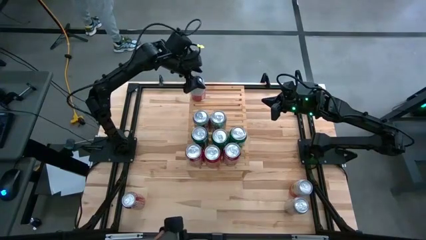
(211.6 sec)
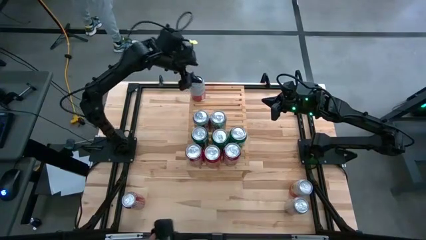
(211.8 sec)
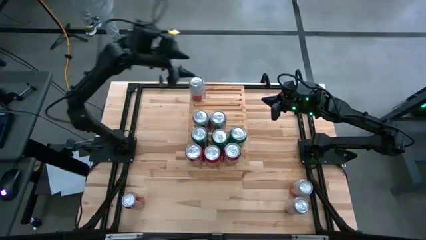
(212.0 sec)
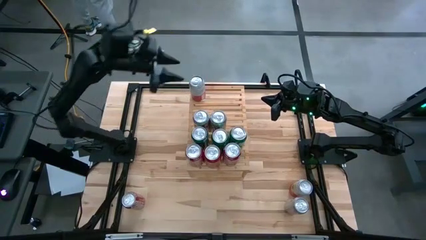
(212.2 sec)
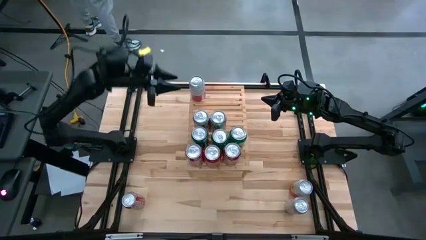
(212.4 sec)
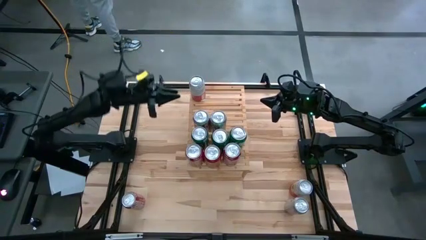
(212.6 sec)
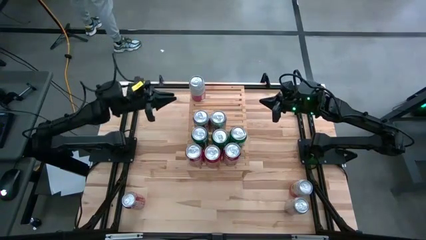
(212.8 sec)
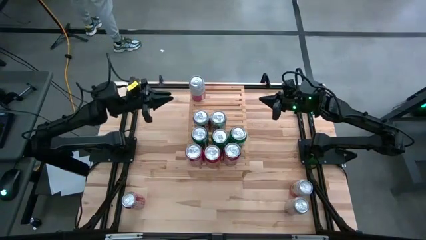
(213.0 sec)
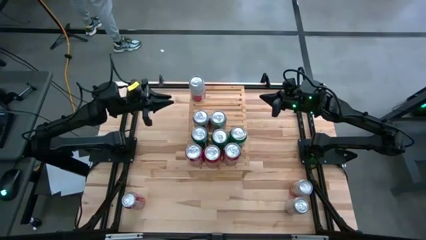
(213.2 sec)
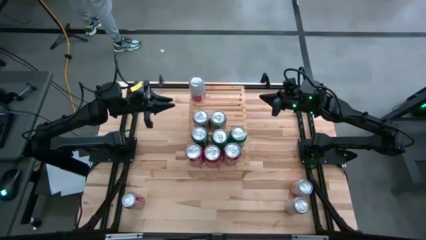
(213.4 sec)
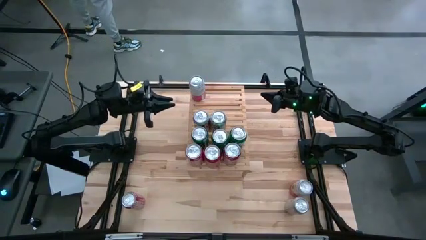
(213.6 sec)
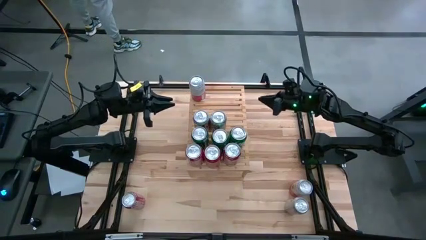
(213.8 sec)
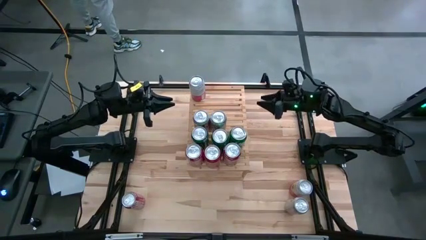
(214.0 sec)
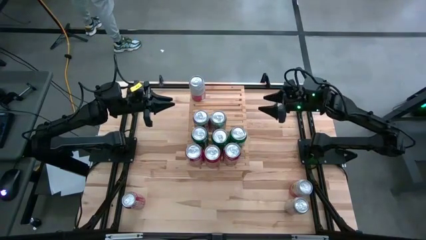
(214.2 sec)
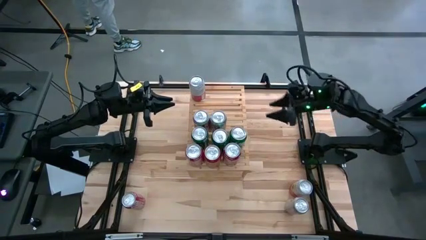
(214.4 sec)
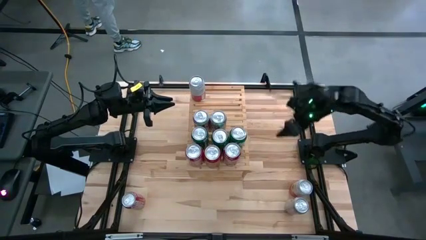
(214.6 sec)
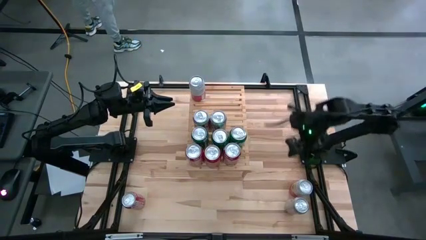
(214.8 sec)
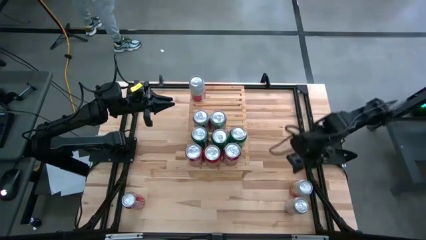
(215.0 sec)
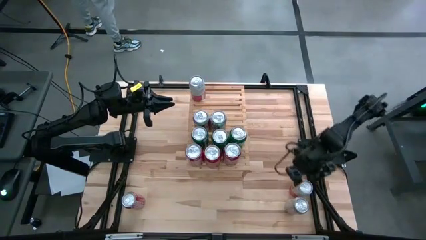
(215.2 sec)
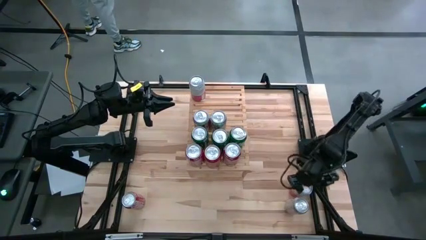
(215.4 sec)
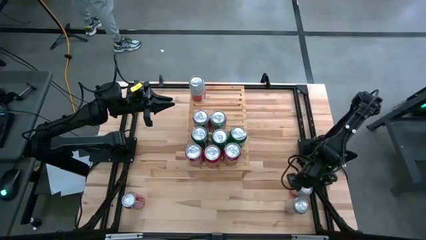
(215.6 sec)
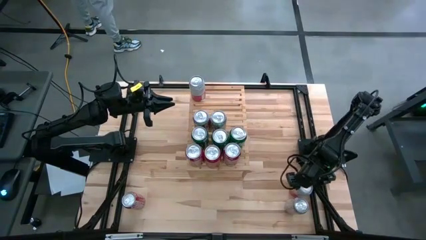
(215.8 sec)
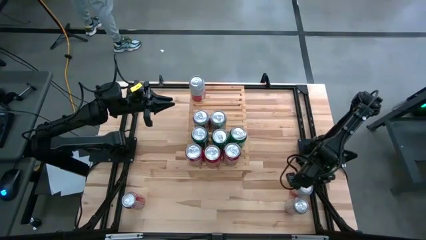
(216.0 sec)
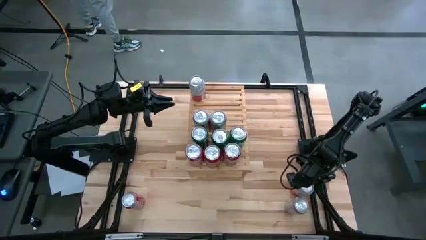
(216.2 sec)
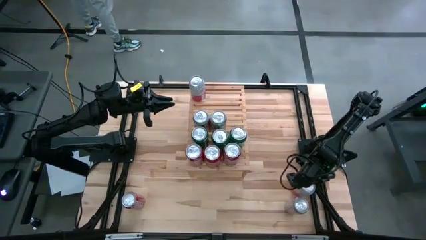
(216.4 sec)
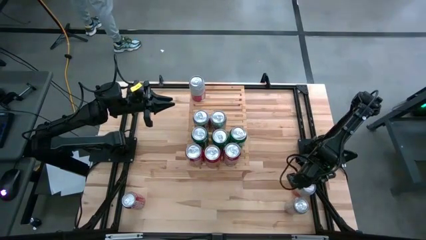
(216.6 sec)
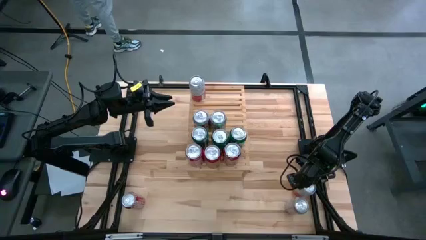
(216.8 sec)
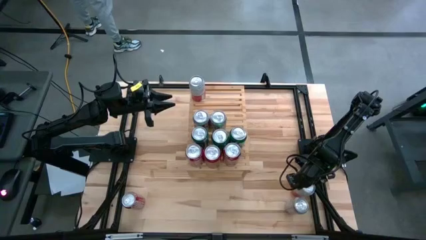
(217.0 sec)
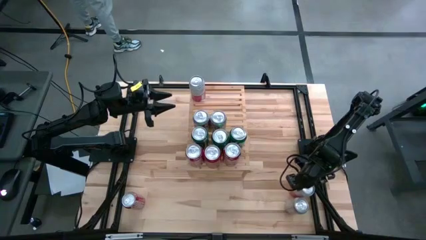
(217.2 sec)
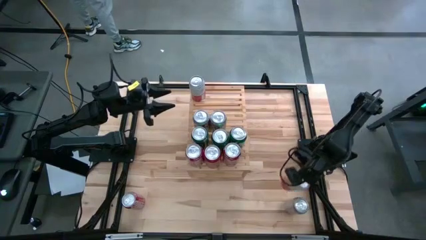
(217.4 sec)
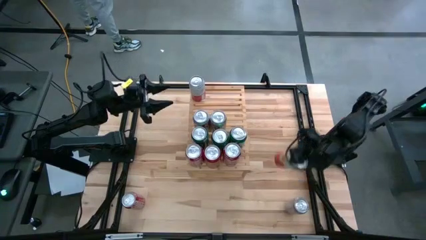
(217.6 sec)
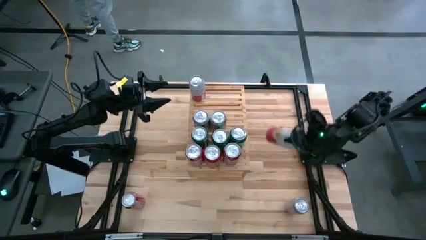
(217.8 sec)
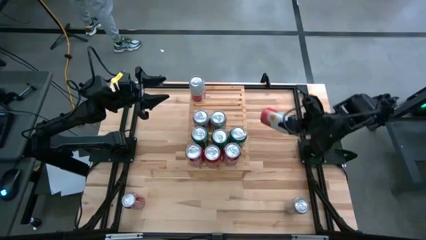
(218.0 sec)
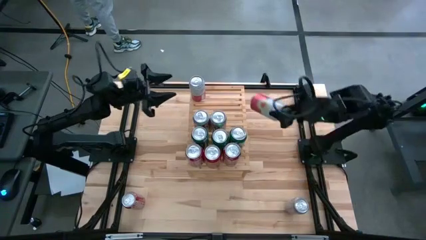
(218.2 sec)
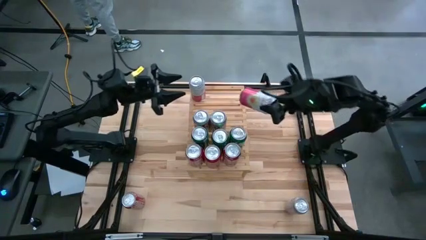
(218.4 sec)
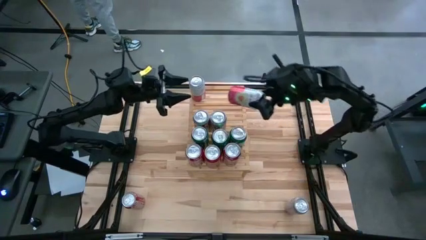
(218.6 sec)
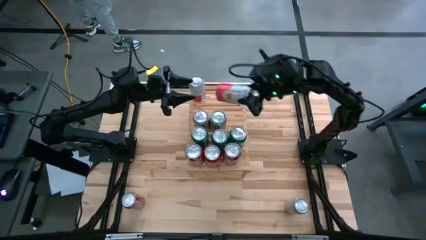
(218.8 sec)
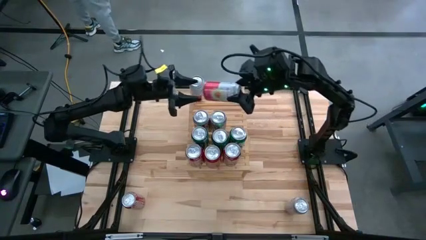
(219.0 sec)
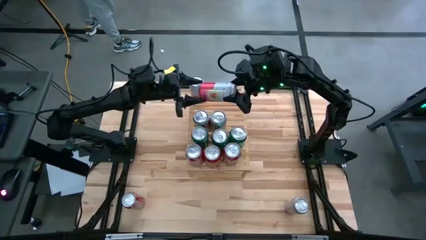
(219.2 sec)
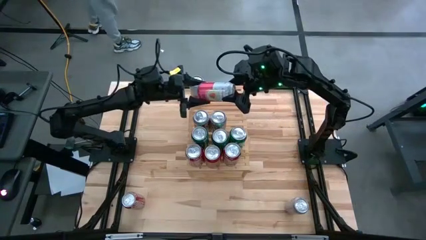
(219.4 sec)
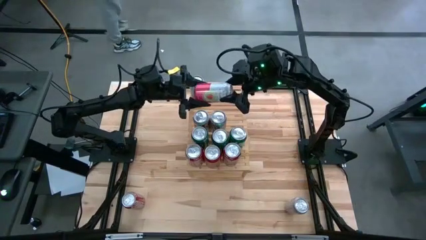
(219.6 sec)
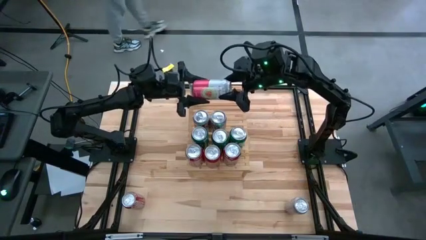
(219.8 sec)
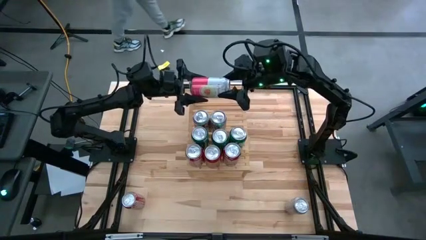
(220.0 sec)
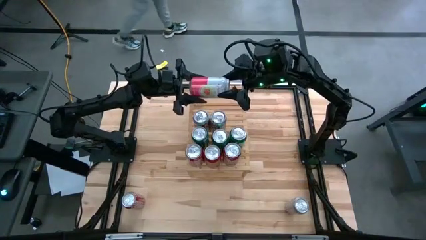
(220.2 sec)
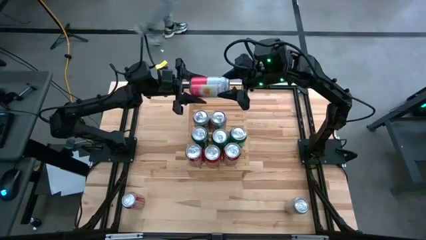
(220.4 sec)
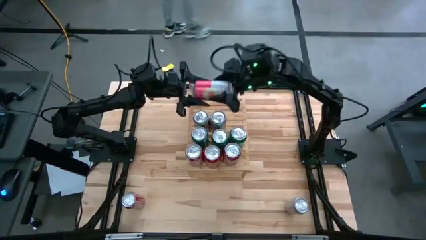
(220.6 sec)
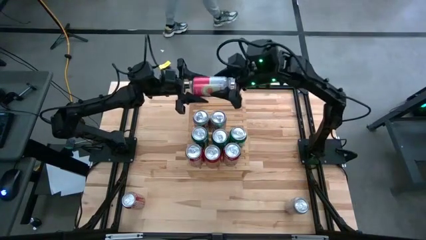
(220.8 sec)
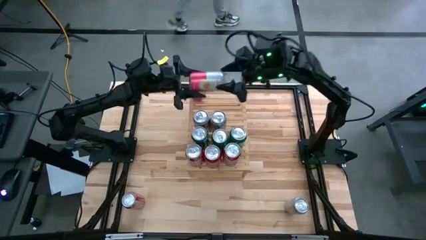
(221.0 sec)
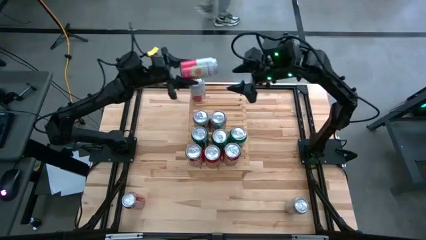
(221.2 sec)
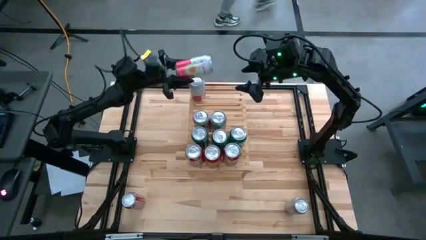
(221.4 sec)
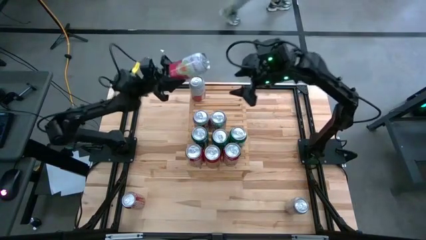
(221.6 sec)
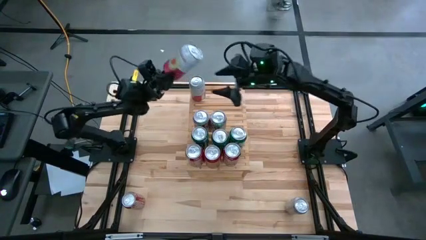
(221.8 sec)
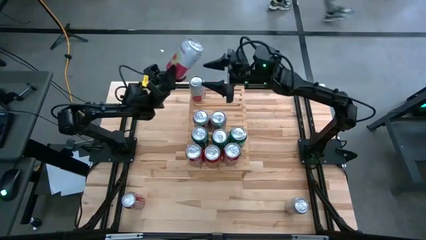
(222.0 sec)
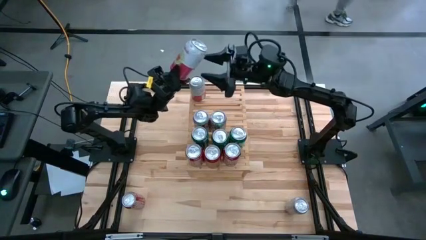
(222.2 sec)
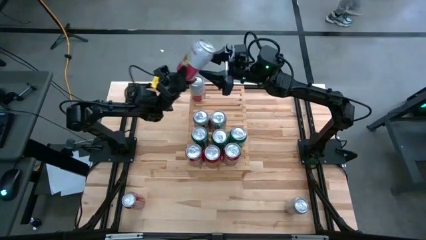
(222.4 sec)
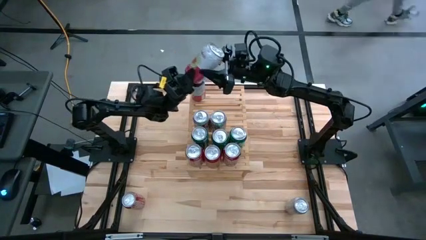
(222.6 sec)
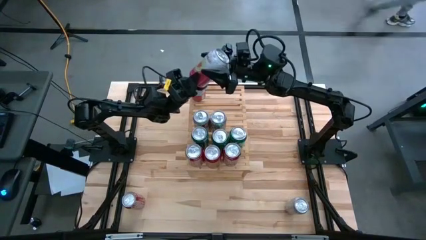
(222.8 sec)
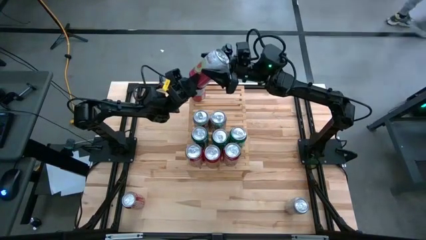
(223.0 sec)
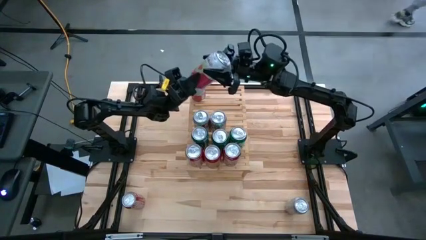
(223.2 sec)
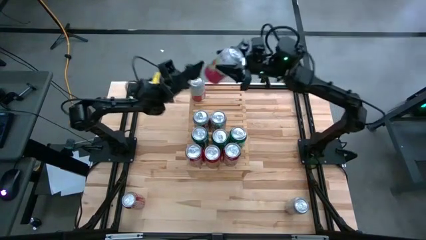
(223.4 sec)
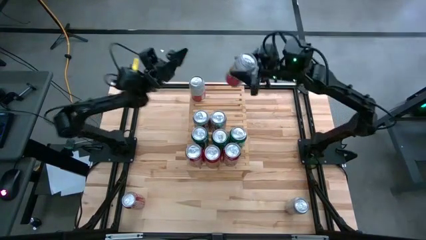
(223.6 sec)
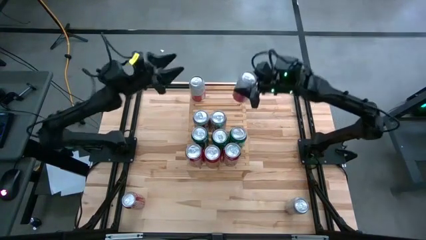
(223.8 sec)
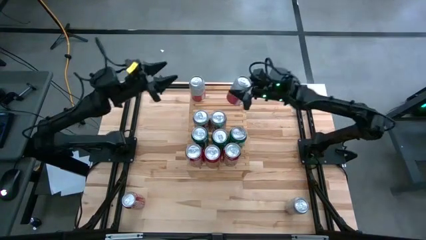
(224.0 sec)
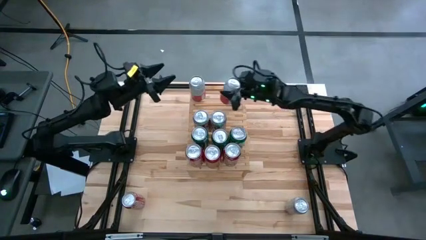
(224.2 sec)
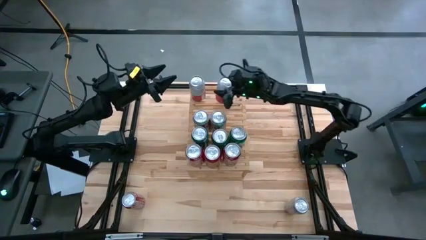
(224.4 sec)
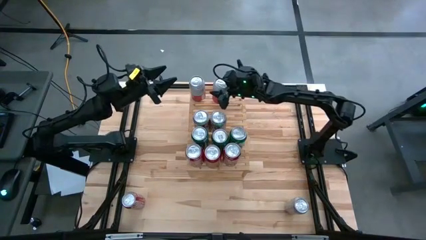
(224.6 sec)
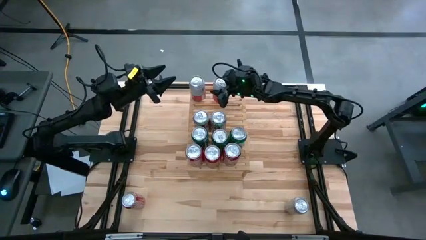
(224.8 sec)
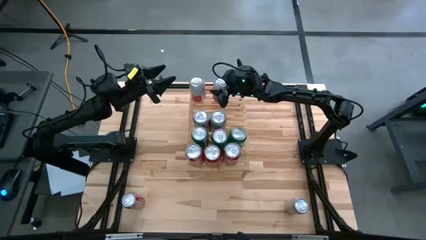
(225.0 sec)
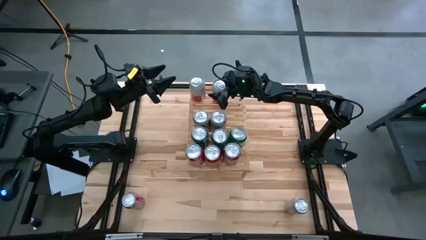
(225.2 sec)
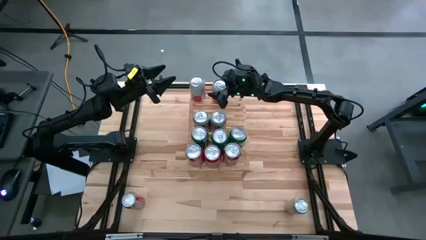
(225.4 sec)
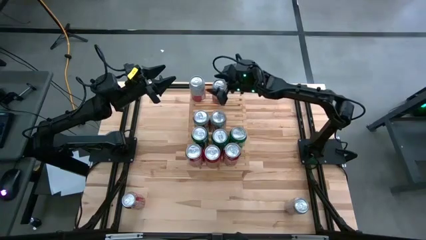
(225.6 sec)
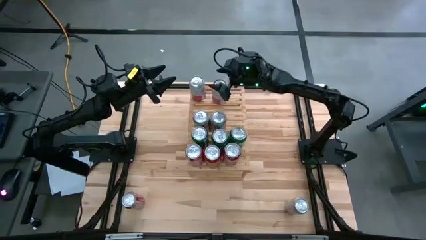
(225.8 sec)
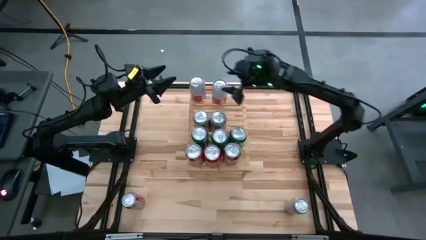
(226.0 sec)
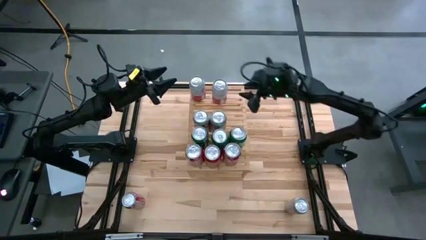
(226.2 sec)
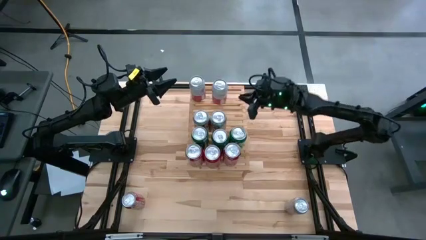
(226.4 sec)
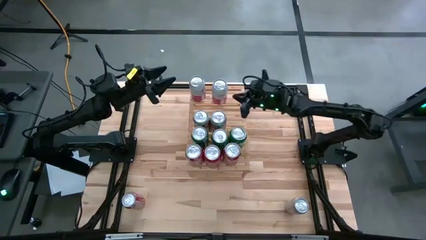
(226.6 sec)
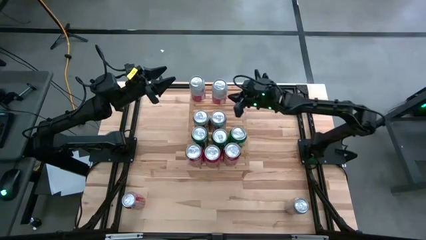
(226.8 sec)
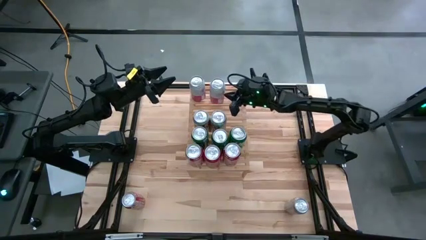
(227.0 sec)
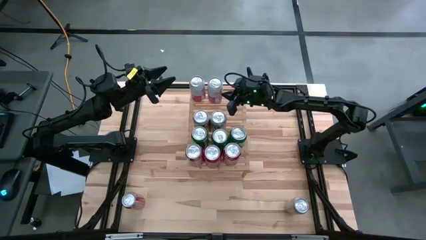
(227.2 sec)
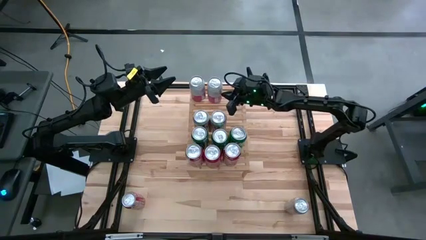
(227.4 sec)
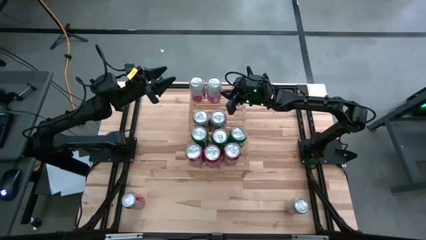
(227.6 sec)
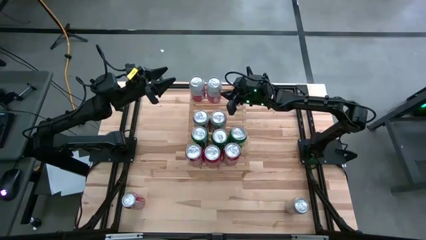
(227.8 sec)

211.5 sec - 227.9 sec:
Task: Place canned beverage on shelf
Put the white-pink soda can on the shelf aligned with the other white-pink soda can
